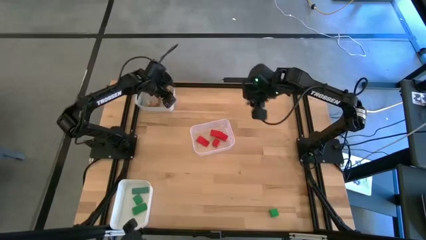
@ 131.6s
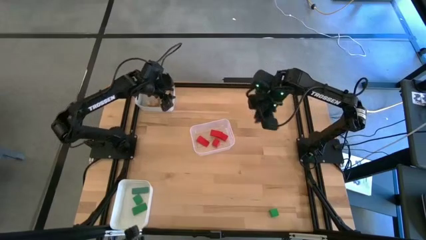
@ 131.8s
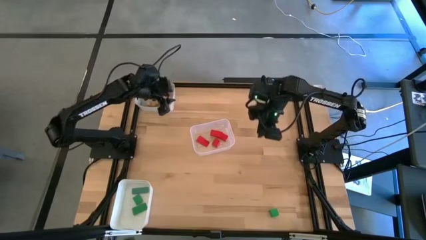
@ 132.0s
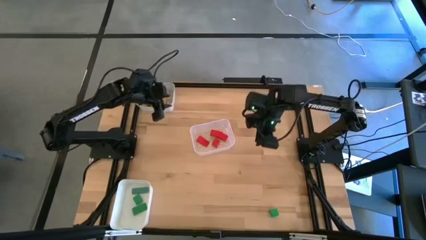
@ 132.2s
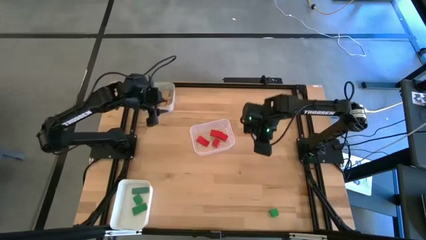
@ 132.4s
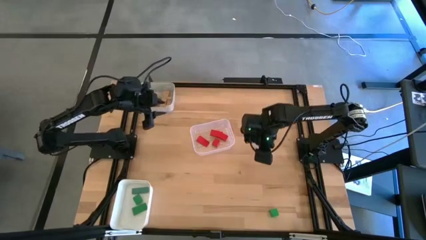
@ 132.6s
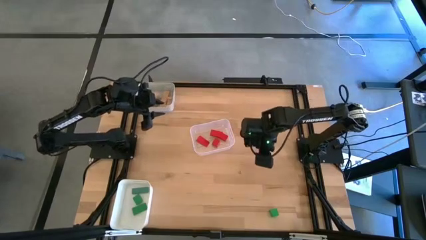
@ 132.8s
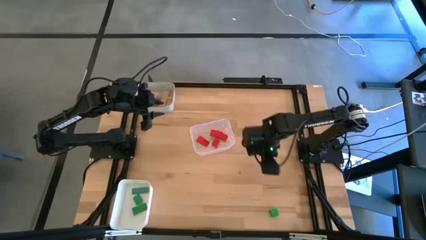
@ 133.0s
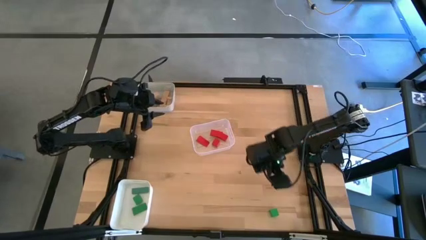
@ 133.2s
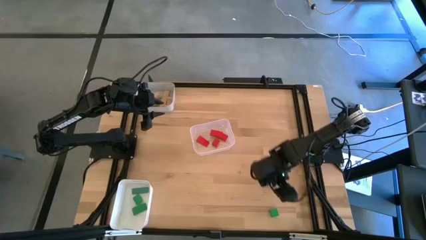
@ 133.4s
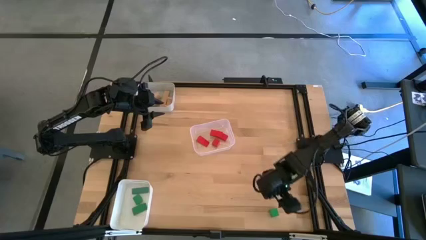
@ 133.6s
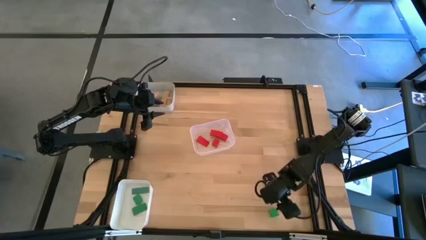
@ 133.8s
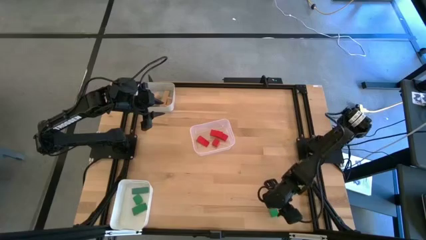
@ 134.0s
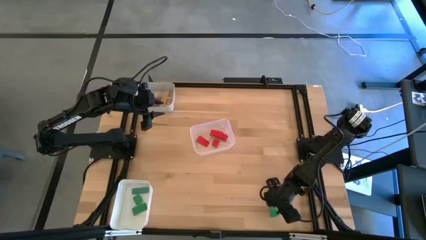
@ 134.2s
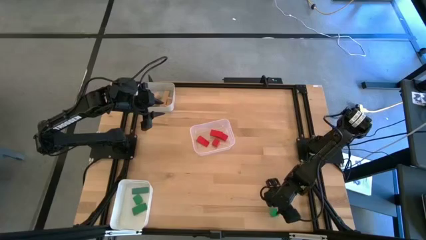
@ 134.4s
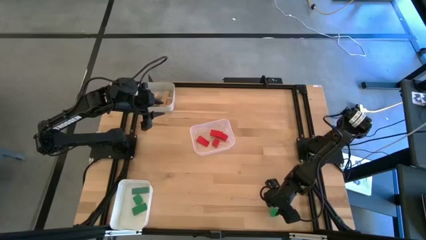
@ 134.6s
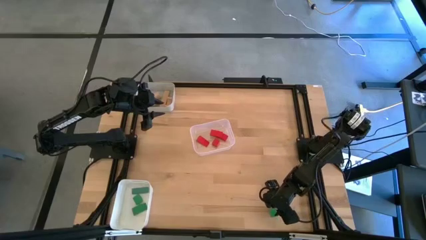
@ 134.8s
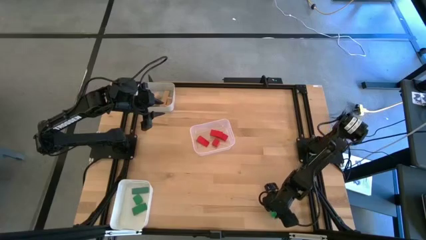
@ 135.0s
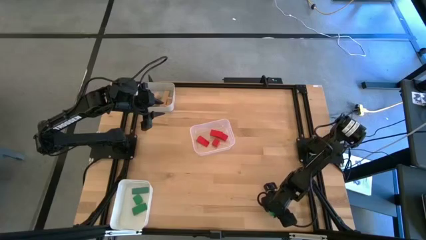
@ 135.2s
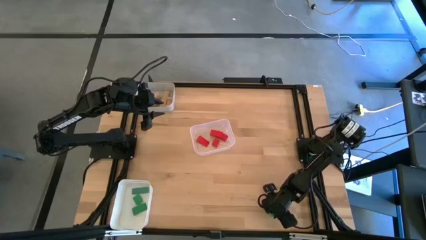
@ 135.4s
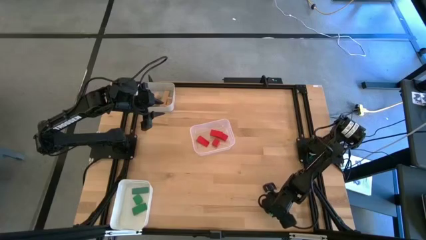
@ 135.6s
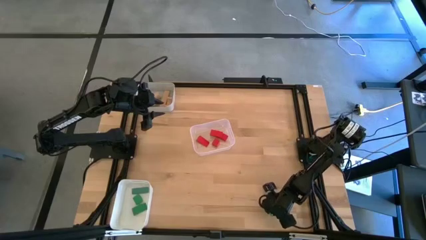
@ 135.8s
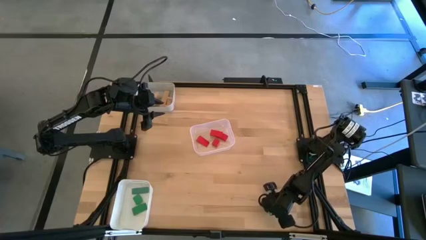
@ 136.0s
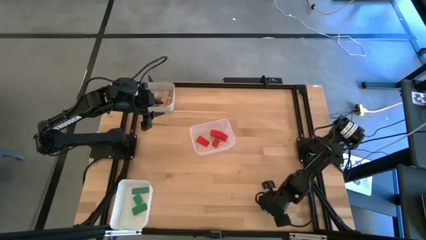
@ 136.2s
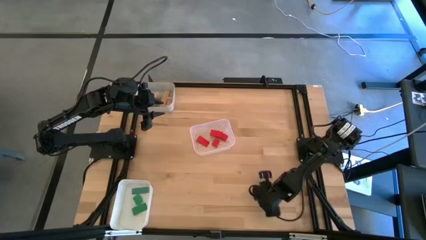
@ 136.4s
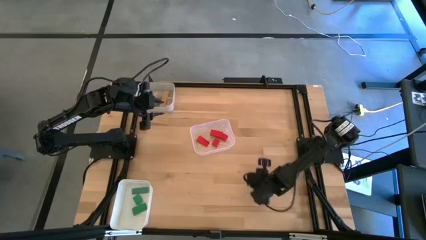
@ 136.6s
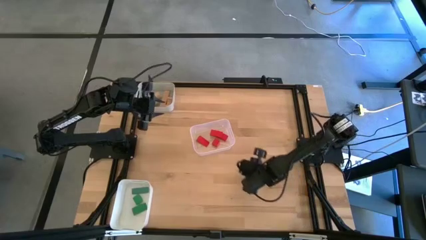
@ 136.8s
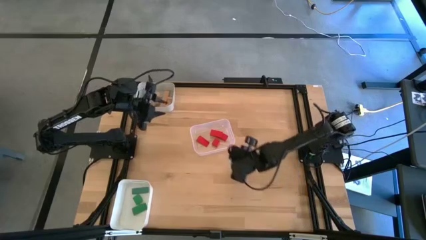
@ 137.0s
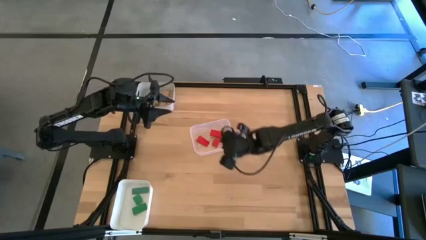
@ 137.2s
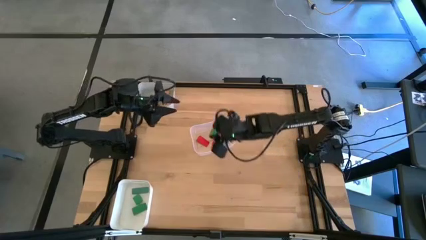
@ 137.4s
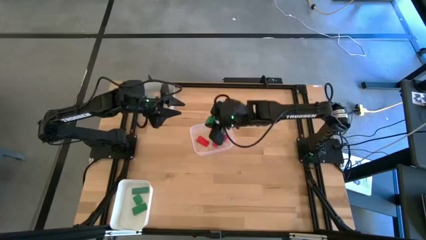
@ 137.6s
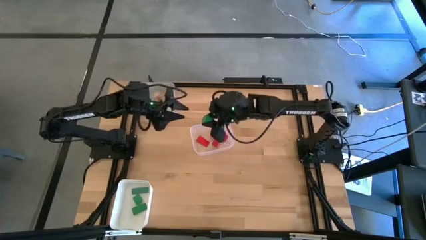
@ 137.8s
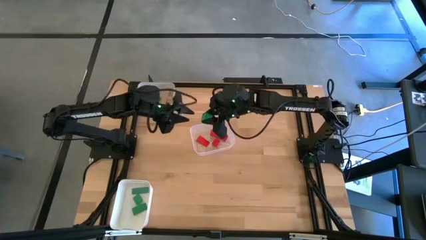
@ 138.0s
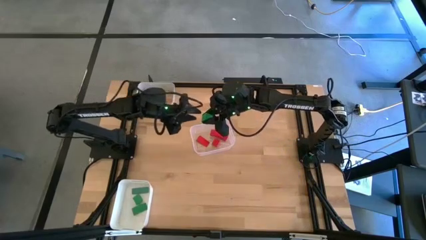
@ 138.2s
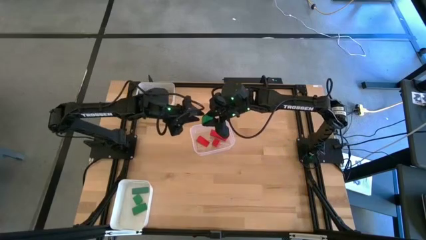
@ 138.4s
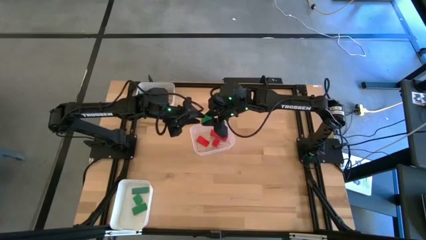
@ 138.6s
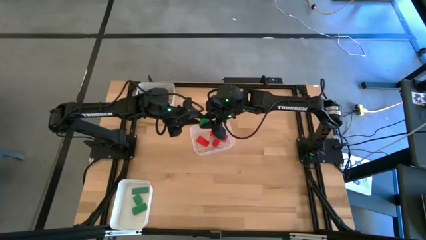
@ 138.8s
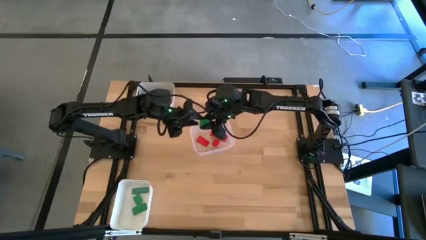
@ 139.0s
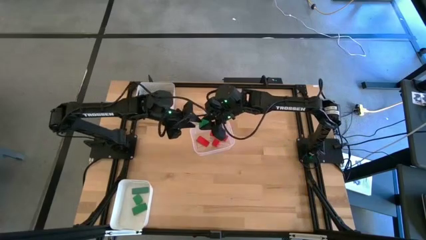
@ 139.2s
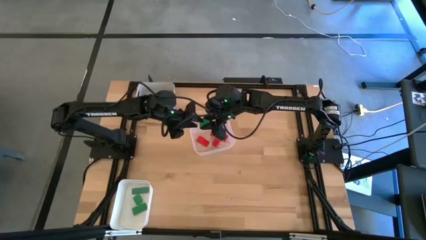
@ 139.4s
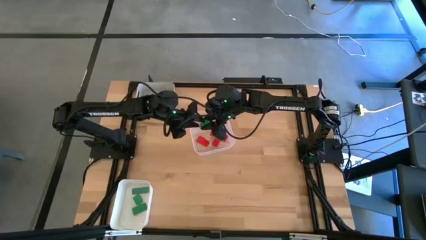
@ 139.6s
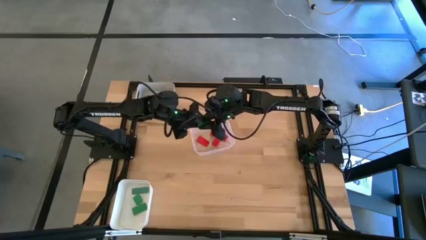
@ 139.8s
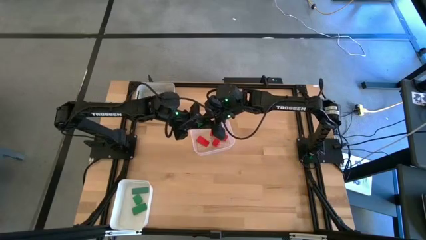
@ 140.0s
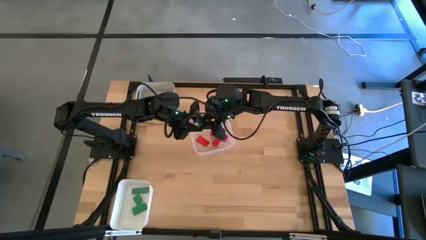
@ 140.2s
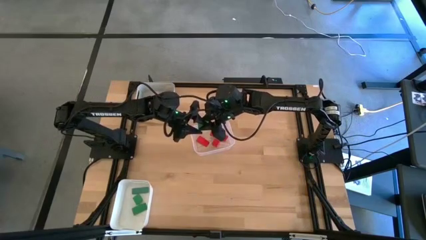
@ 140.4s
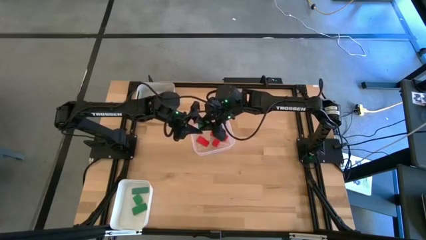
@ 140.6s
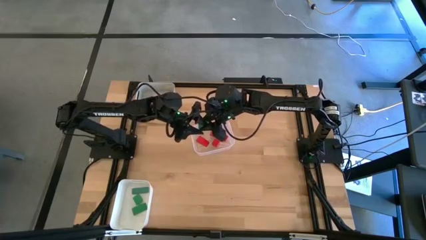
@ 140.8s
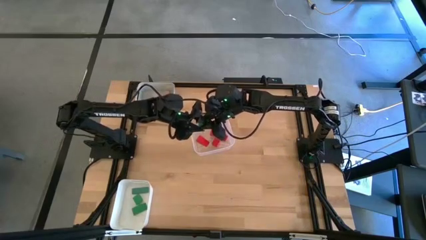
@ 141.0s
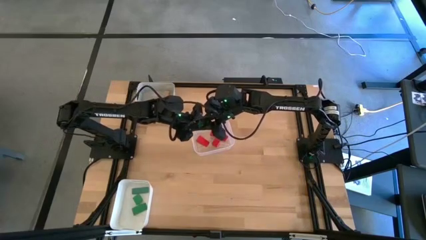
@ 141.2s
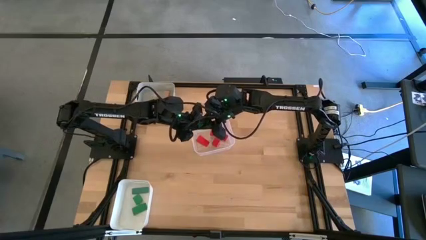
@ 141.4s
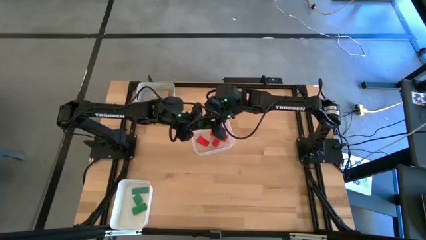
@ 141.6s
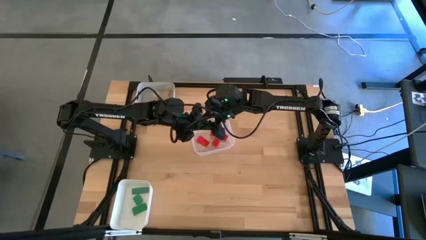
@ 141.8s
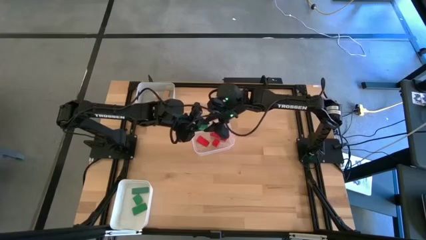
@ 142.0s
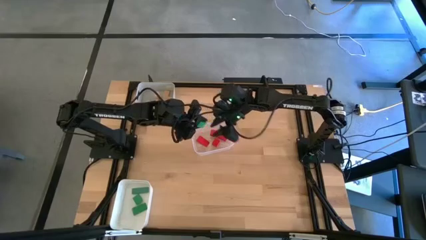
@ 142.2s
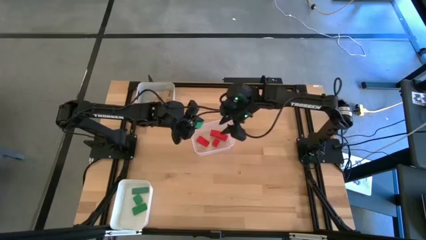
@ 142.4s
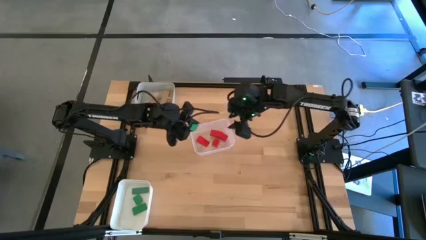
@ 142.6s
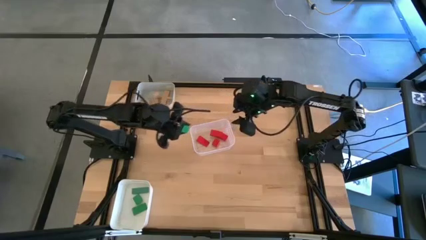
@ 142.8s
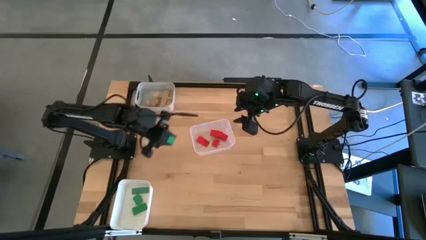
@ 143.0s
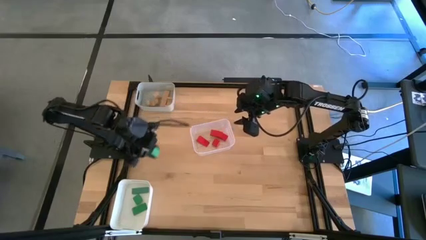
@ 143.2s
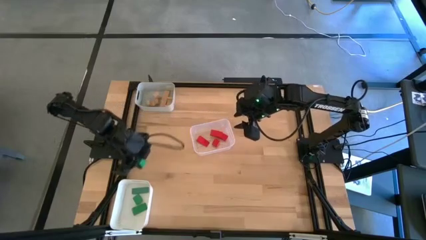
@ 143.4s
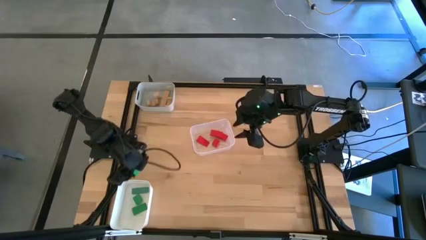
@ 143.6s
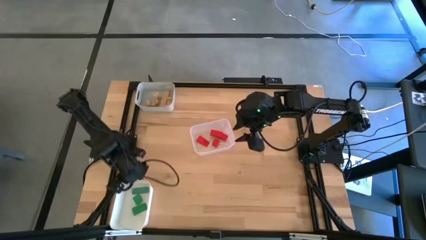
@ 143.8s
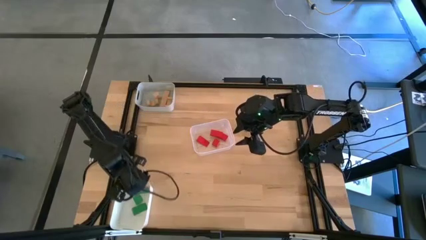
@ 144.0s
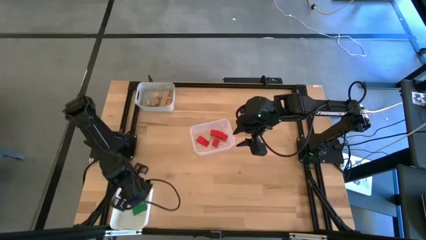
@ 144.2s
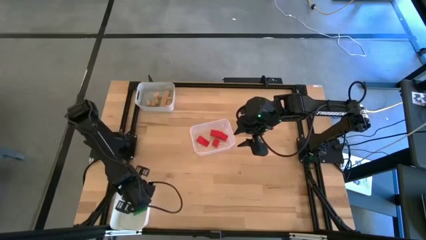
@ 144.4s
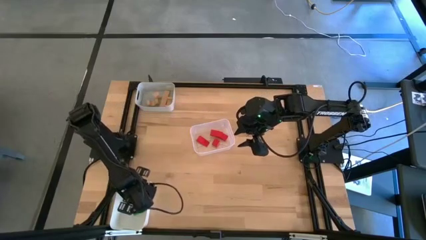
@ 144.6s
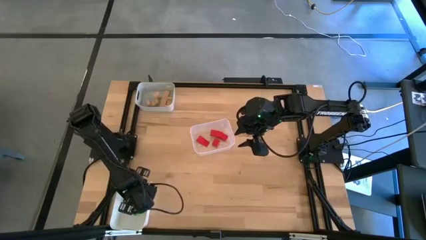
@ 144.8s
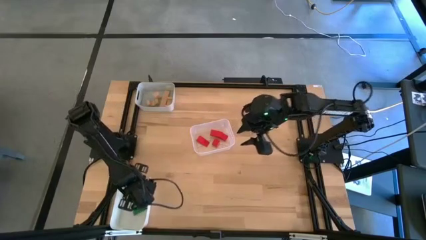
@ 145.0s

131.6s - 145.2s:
Task: Sort & place blocks by color
Put the green block into the white bin
